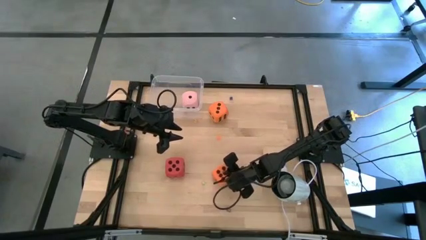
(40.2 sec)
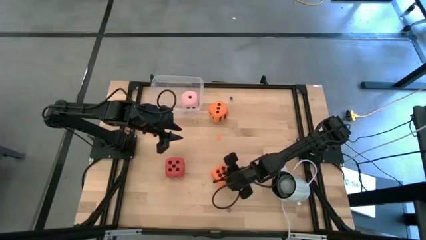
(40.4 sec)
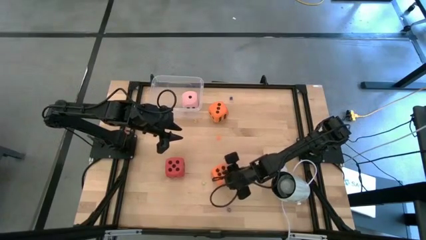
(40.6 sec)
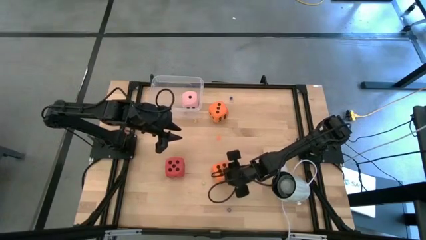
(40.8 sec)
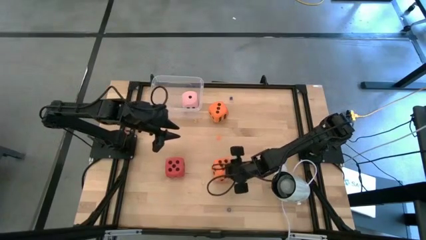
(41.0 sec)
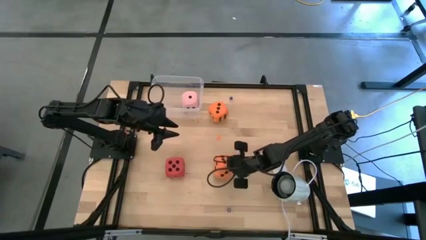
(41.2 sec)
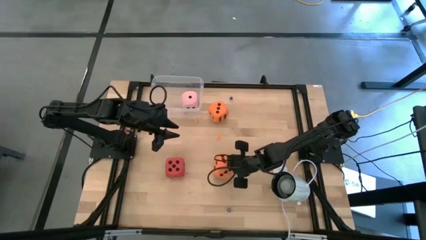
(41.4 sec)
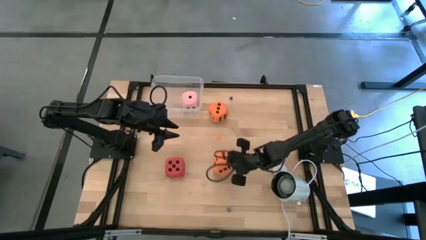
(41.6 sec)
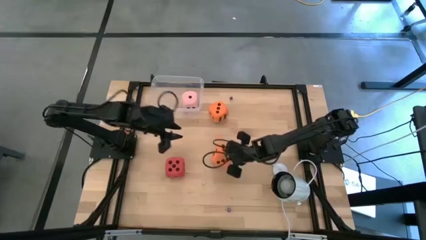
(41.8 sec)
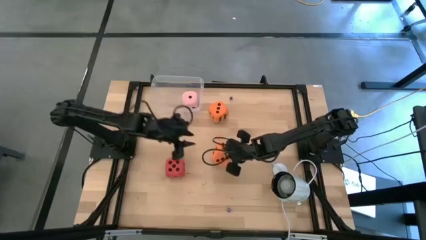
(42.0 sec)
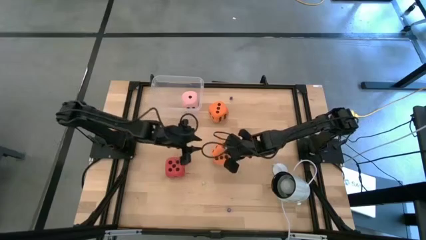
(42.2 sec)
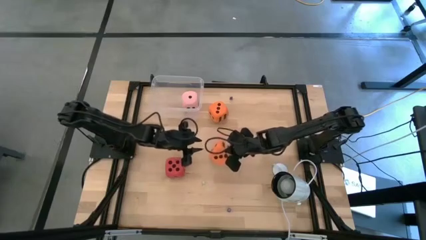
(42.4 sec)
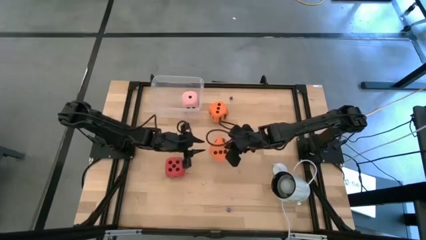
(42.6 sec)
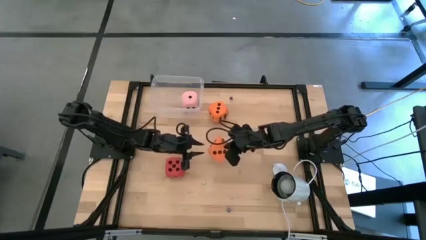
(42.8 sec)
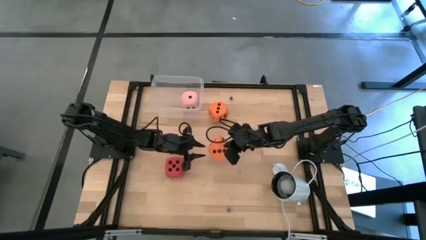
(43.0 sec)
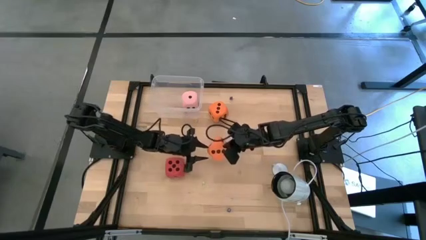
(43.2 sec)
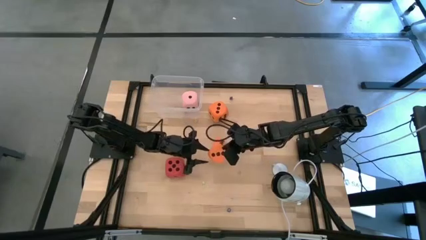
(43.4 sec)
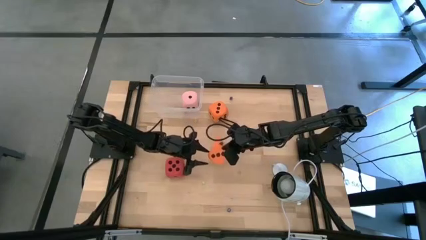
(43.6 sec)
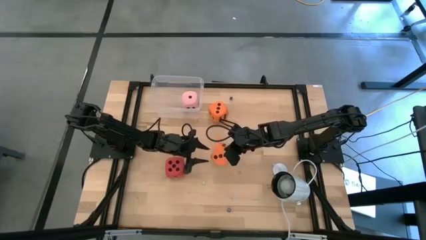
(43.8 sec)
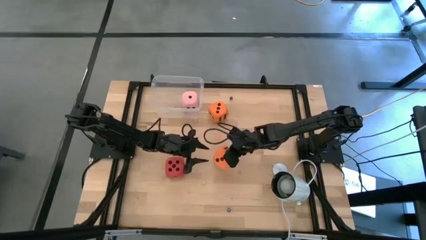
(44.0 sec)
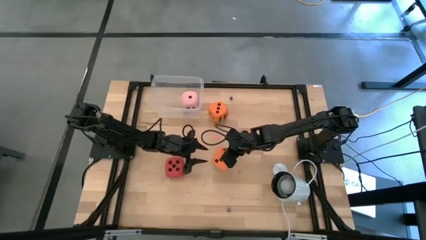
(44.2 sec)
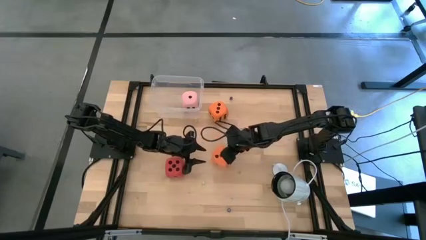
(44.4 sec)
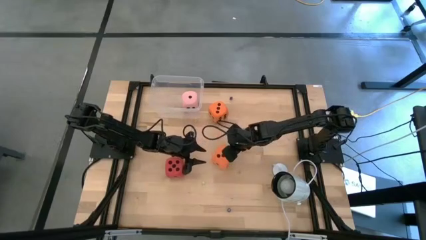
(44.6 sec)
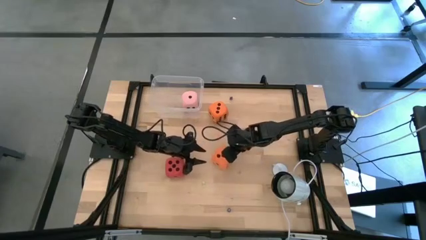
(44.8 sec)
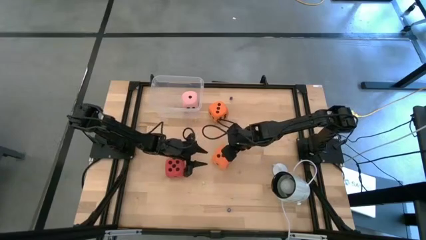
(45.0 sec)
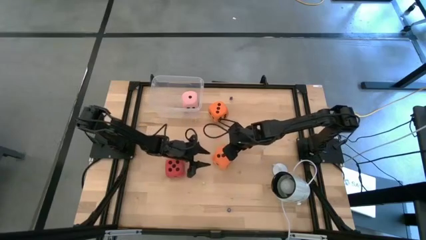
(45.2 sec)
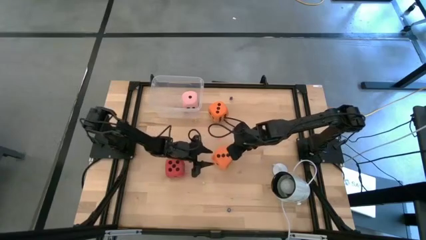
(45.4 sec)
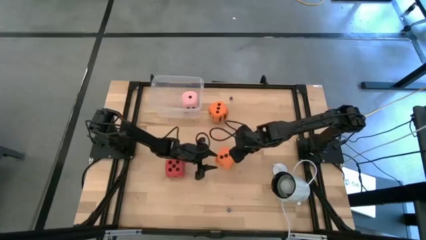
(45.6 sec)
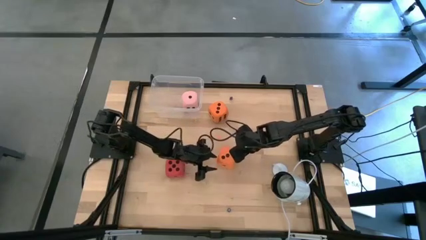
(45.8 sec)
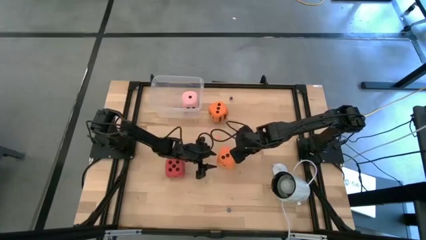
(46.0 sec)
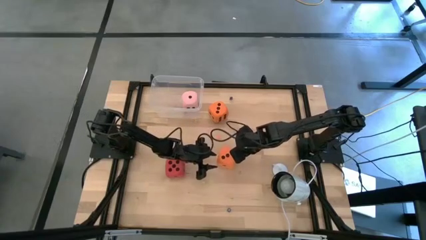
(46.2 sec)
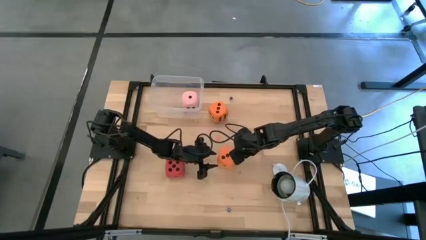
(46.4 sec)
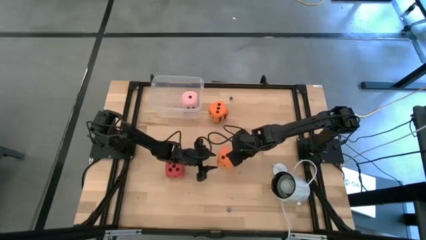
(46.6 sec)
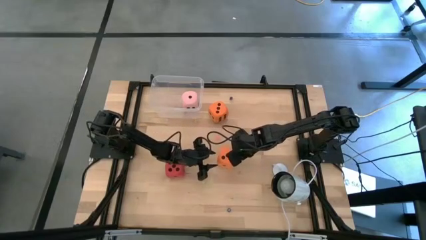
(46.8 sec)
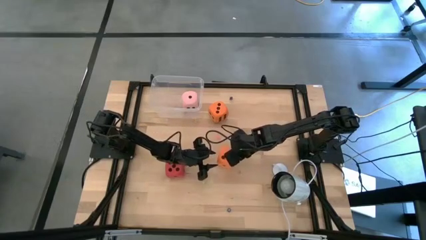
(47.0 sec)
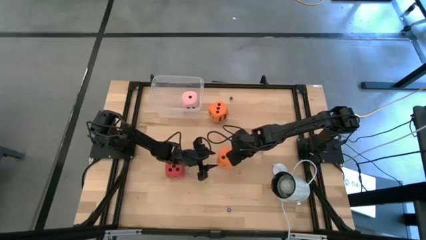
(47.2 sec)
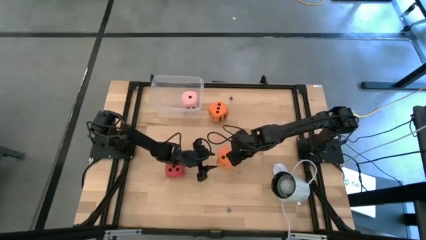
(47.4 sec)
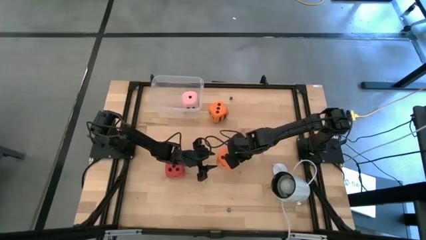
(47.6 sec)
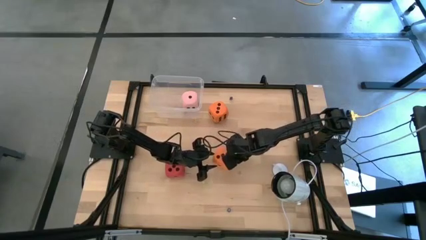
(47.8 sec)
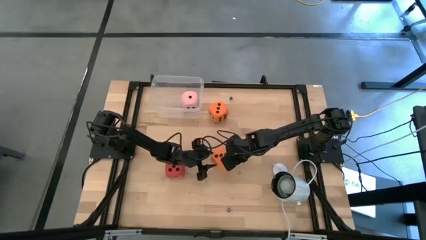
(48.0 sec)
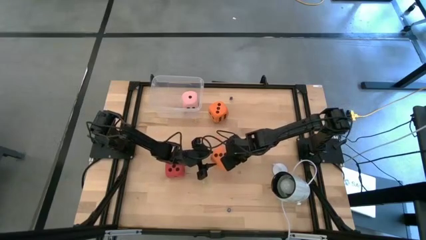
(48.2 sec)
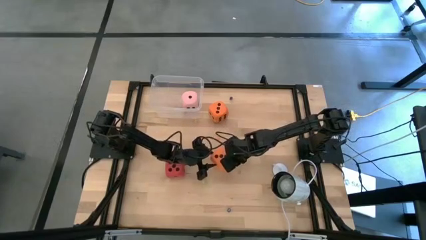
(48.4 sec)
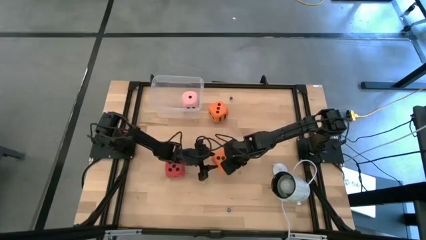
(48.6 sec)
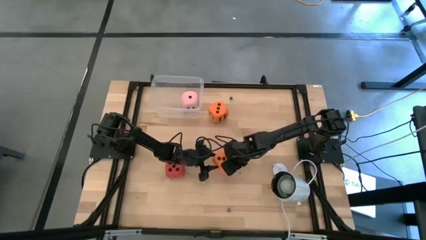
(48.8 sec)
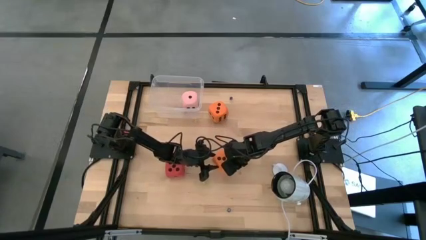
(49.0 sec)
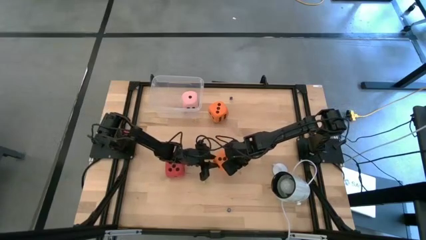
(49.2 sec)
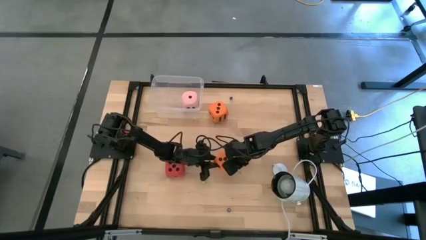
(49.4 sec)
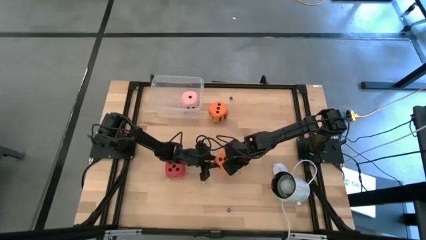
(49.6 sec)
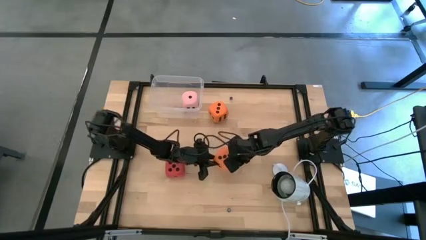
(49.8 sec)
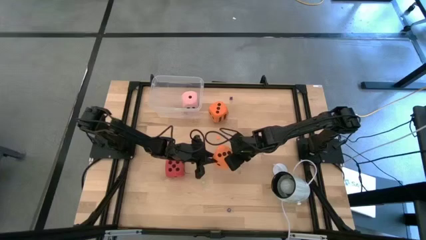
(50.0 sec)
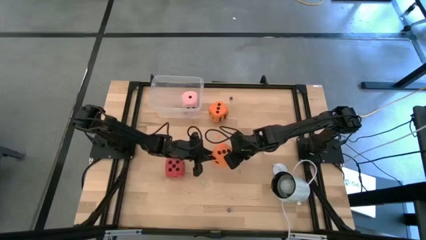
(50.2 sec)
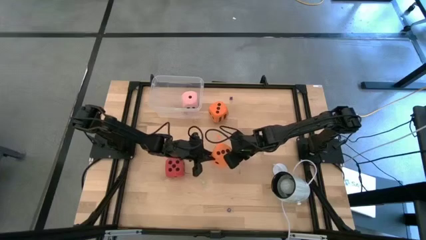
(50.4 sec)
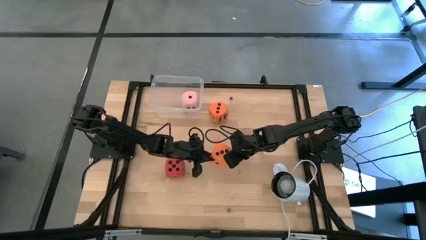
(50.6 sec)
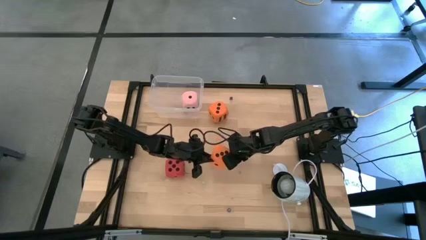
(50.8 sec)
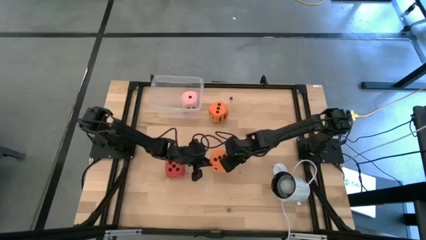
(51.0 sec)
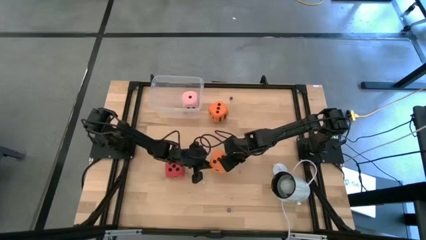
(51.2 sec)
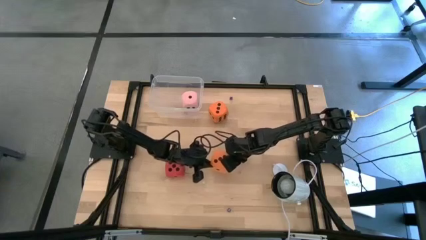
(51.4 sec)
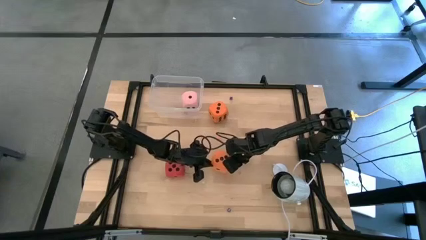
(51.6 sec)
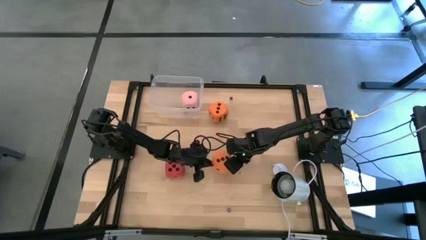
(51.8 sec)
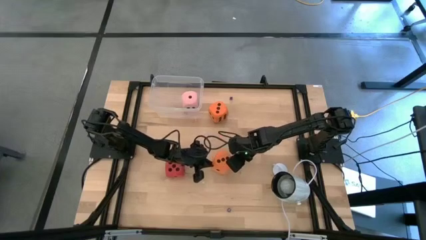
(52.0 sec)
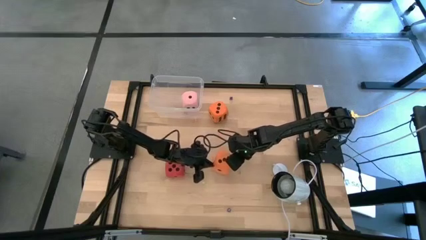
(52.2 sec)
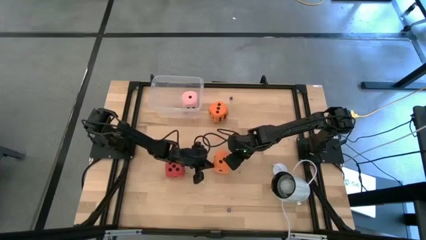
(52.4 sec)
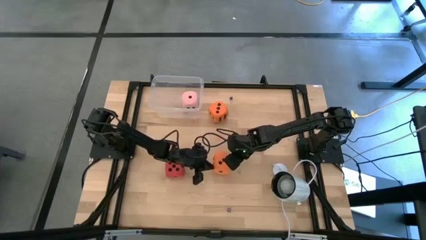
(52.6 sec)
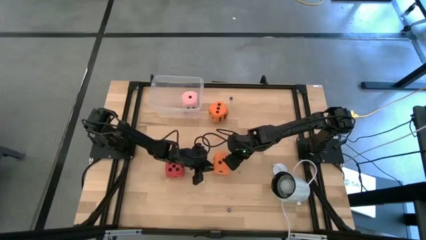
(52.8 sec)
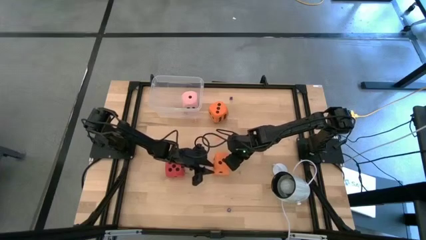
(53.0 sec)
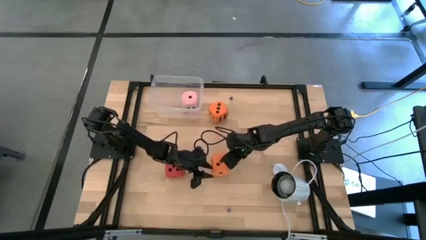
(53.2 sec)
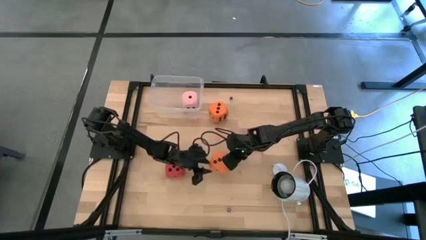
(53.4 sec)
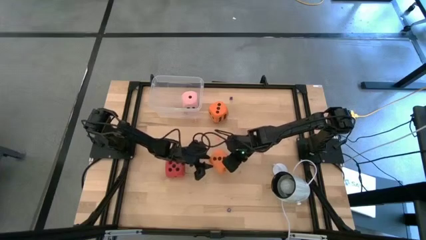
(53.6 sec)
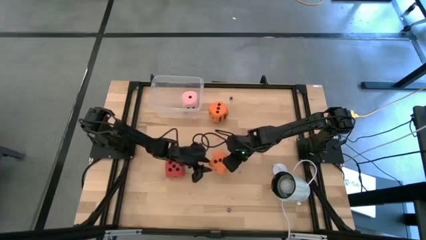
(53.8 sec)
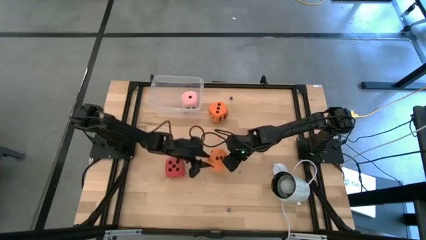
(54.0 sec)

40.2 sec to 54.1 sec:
Task: Pick & Place Dice
Put the bottom large orange die into the transparent bin
